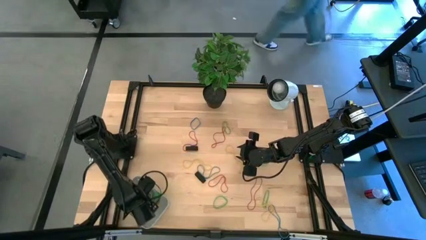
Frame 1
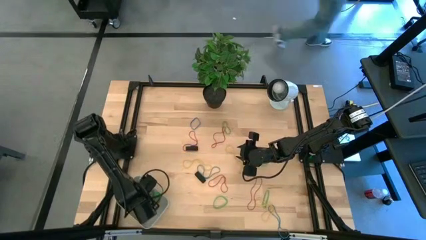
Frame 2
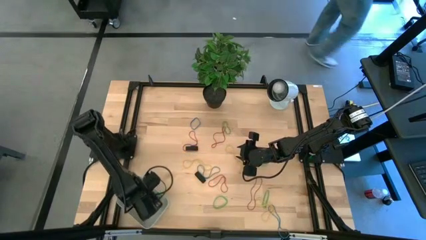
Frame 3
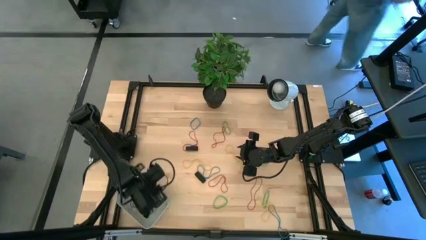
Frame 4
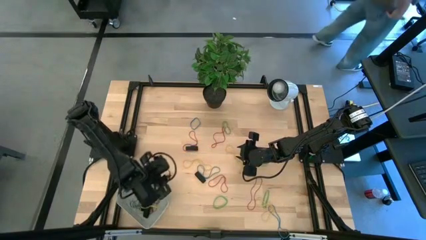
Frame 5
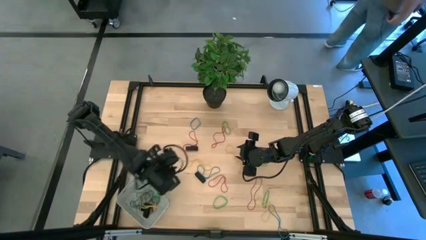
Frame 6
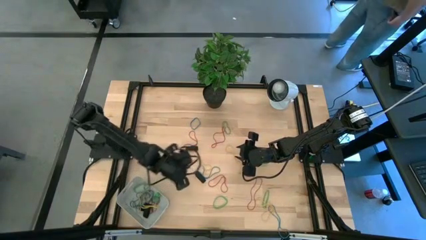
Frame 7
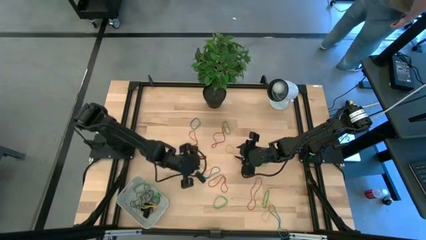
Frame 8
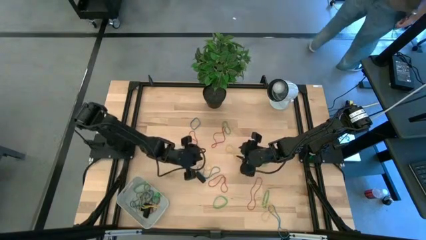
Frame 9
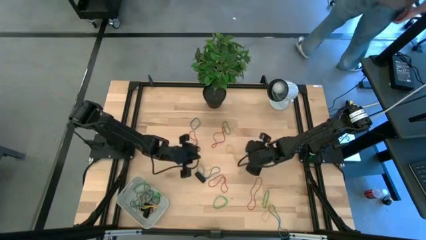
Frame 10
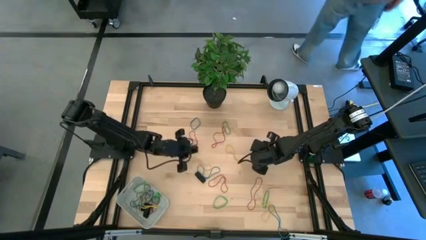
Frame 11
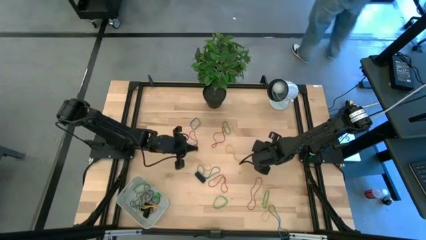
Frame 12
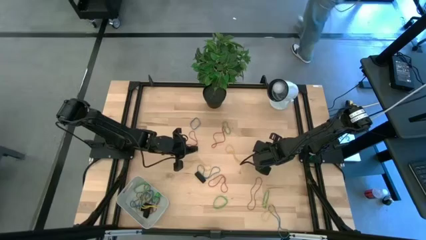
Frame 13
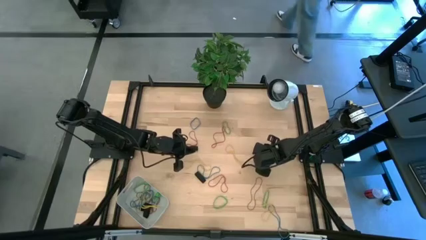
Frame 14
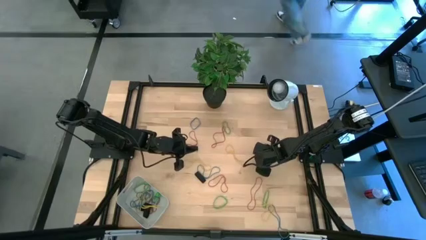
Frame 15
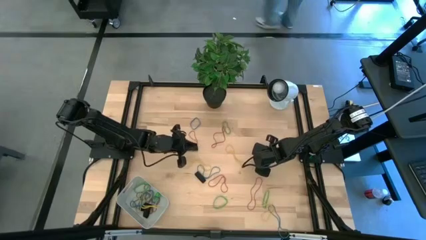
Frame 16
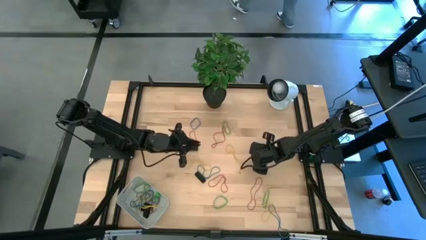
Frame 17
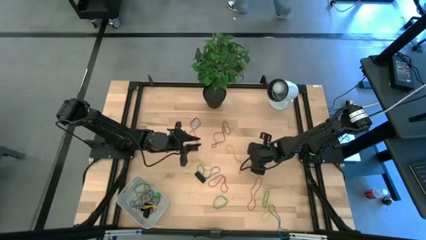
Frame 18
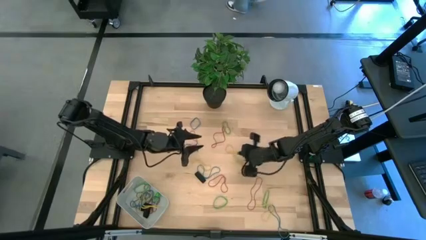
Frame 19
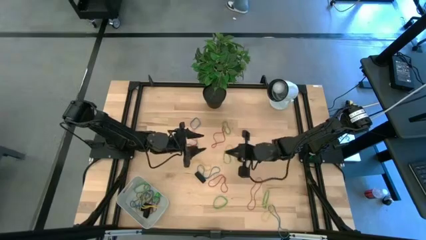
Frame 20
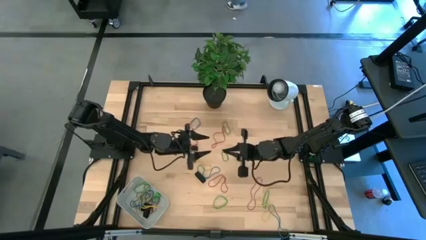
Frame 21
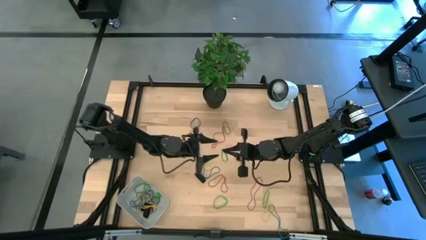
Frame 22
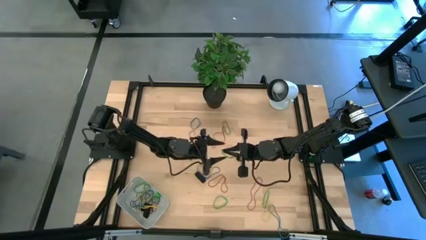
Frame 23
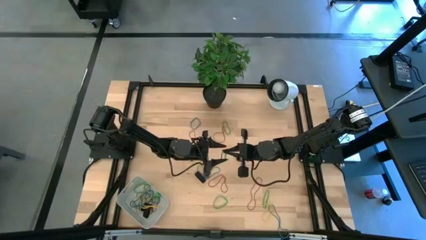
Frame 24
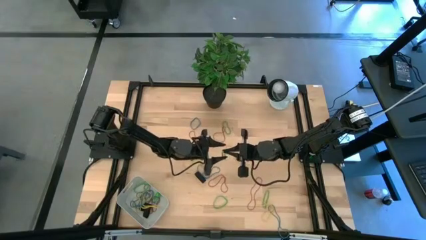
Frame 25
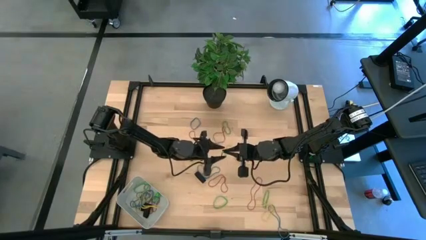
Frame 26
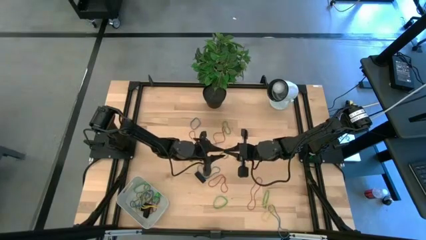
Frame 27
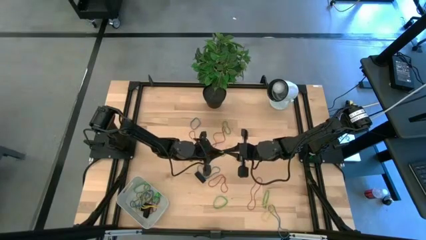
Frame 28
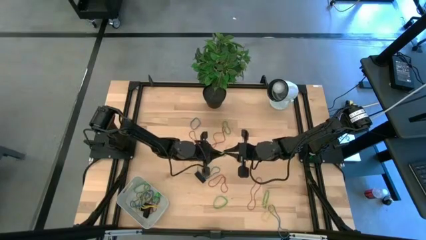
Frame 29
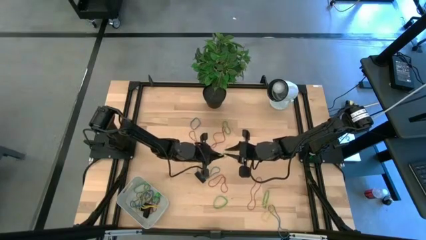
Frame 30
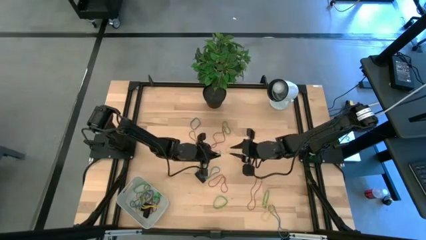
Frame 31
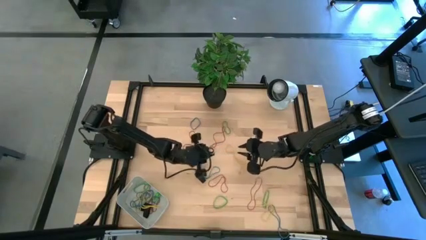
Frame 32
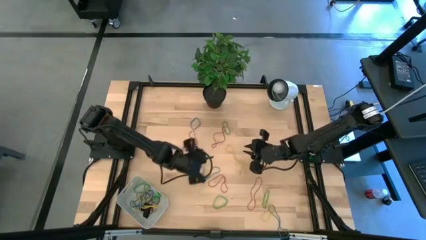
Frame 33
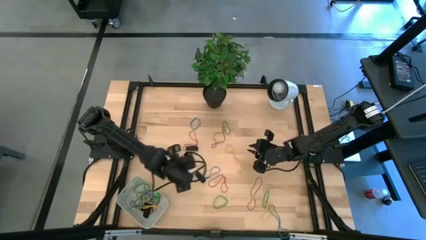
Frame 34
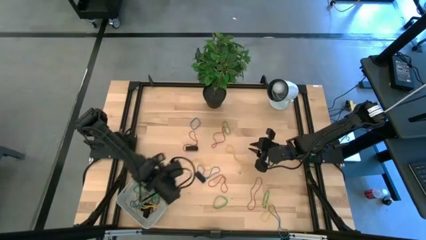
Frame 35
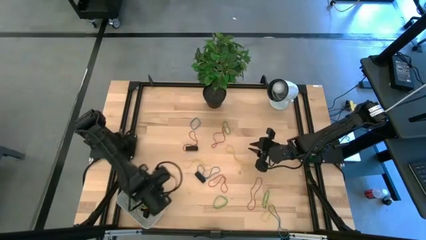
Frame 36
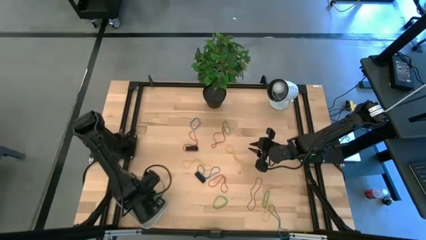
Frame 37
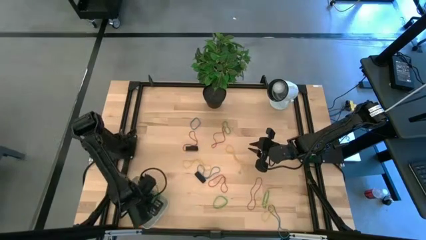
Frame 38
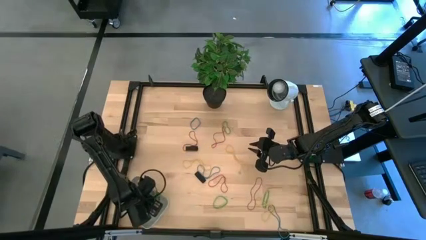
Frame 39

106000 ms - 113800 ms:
Task: Pick and place rubber bands into bin
Put the green rubber band into the gray bin

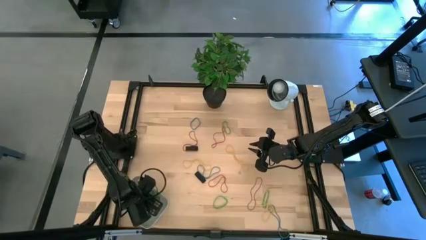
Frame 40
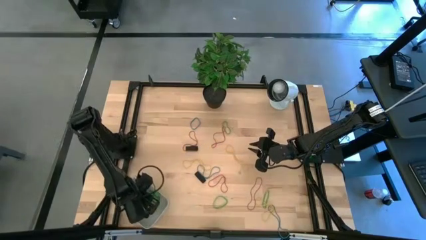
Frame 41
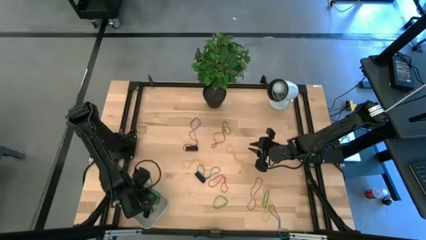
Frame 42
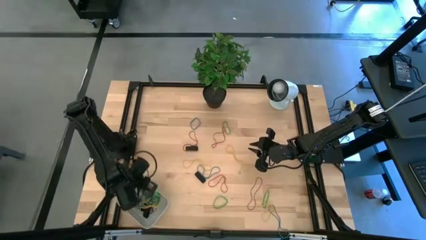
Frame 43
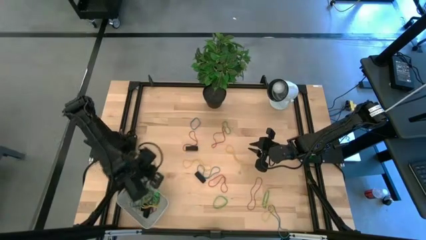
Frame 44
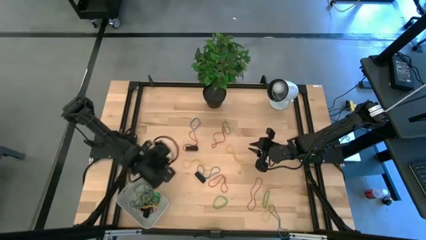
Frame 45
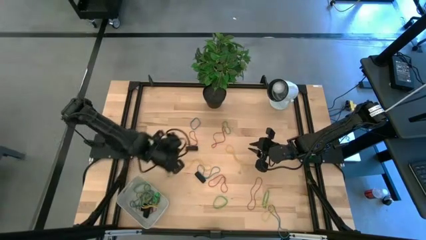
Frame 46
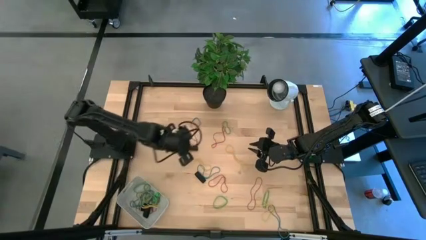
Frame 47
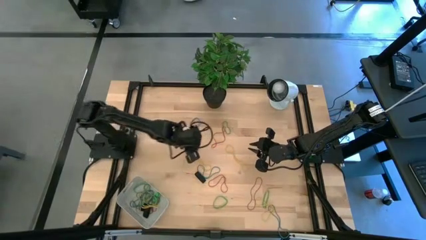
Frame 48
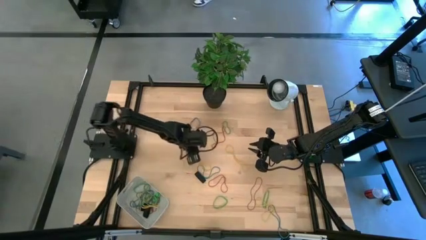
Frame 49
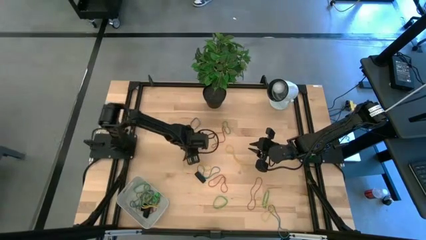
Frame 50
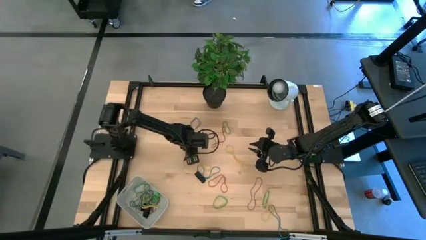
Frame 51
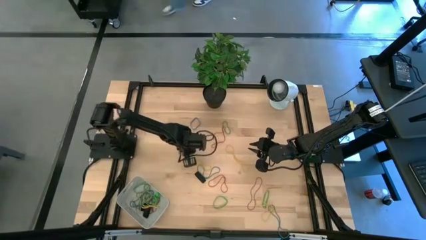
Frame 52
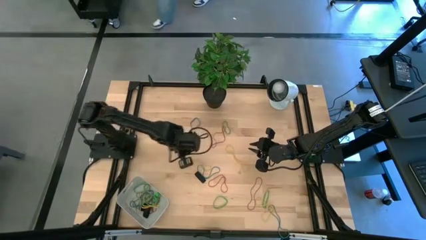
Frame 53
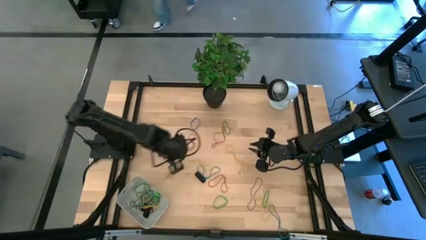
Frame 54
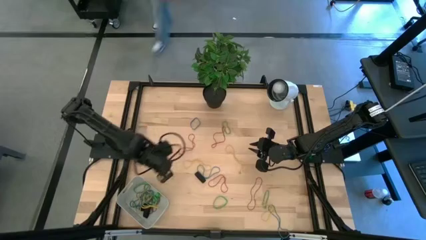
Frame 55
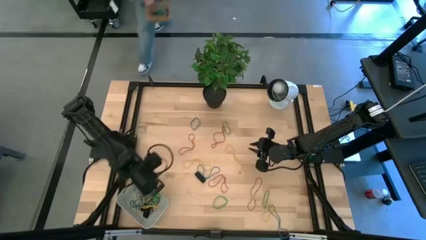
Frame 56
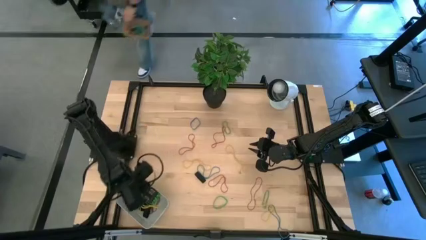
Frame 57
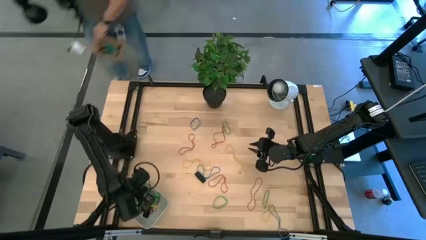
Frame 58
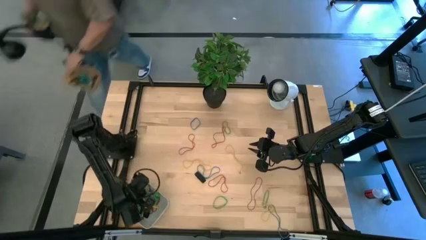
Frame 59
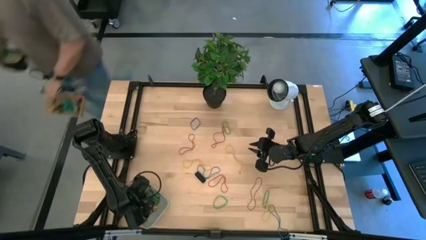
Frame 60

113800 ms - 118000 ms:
Put the top black rubber band into the gray bin
